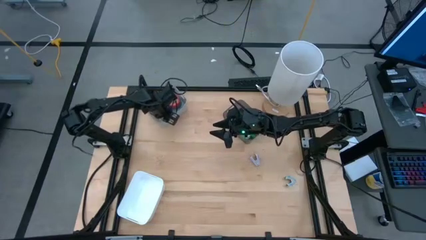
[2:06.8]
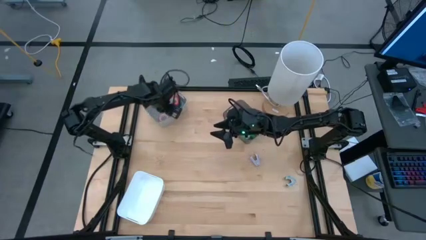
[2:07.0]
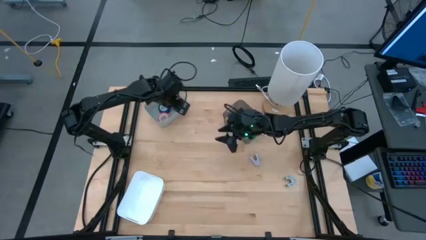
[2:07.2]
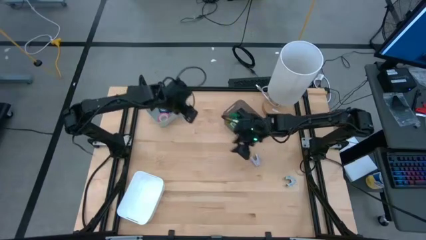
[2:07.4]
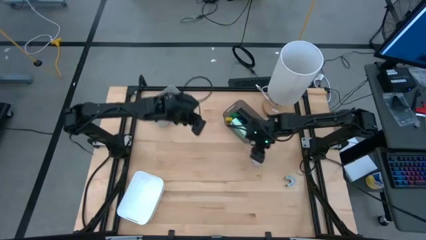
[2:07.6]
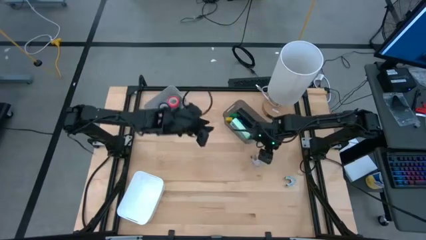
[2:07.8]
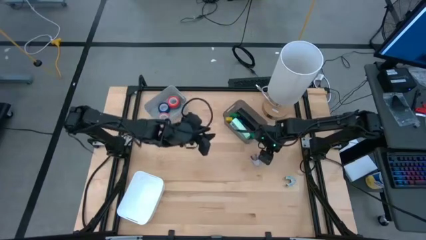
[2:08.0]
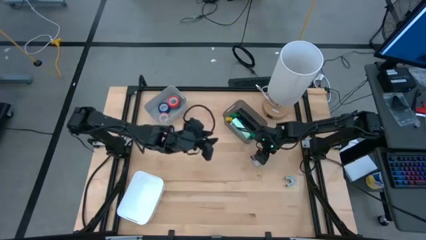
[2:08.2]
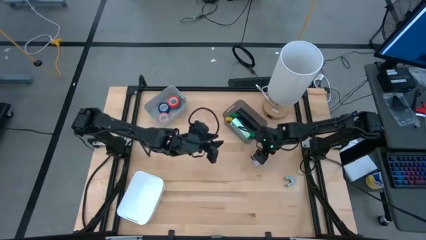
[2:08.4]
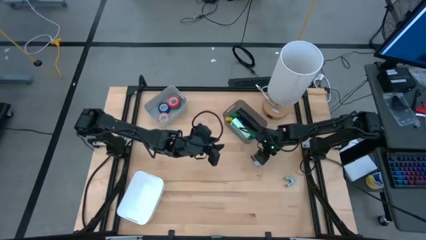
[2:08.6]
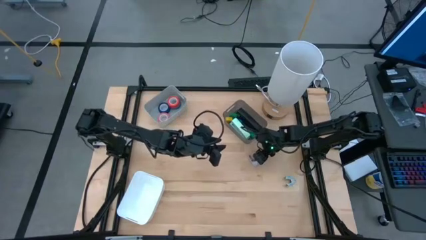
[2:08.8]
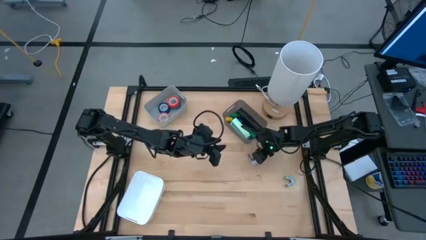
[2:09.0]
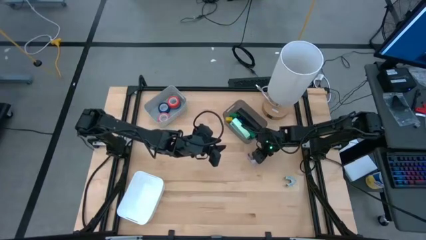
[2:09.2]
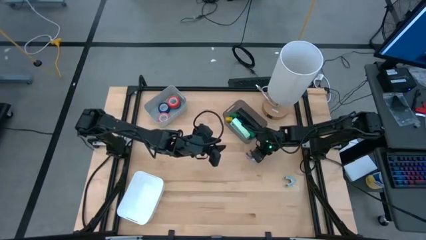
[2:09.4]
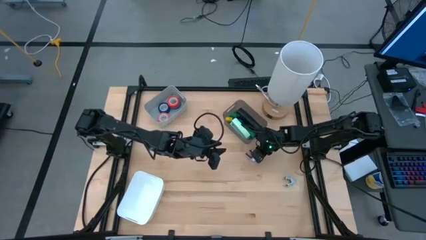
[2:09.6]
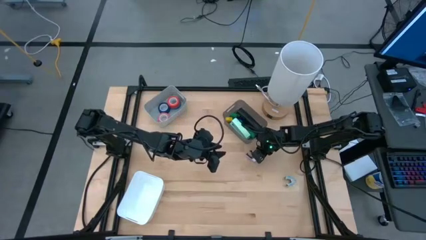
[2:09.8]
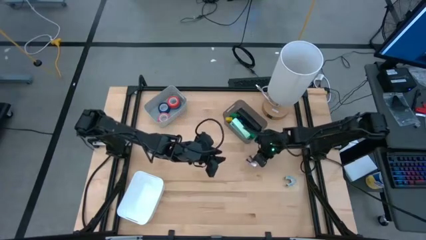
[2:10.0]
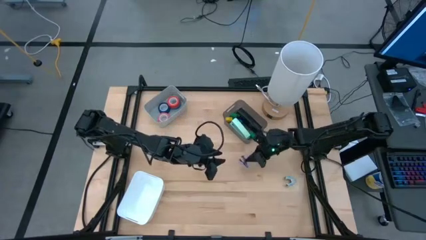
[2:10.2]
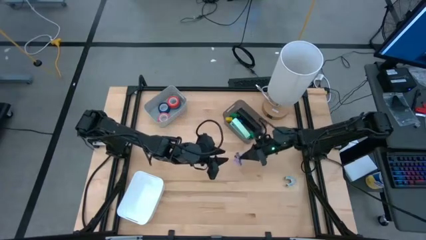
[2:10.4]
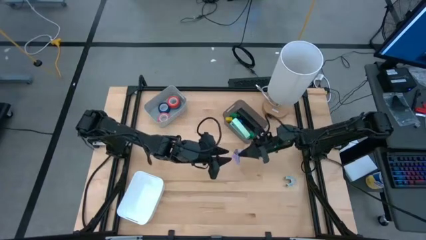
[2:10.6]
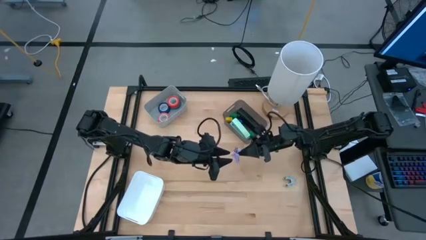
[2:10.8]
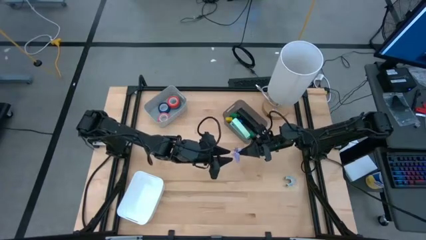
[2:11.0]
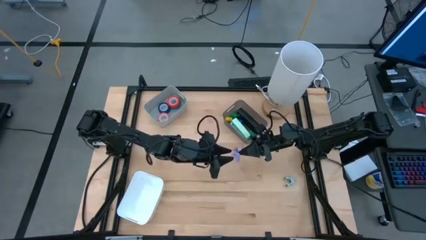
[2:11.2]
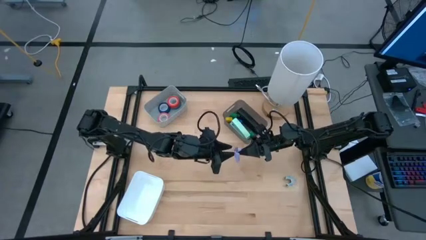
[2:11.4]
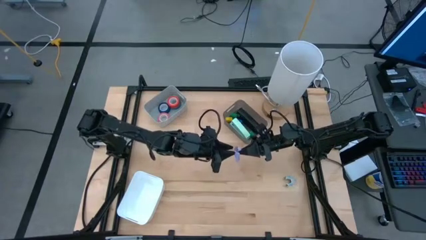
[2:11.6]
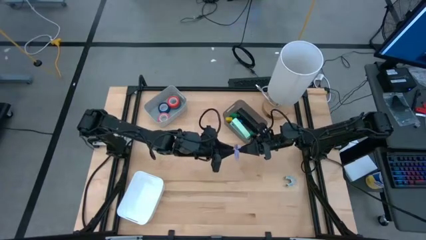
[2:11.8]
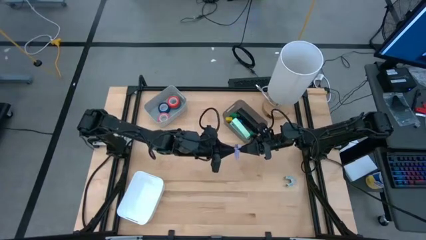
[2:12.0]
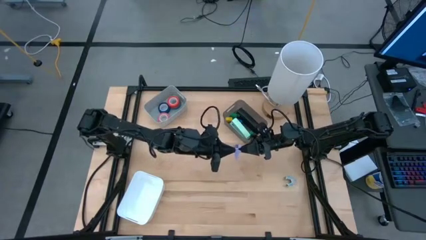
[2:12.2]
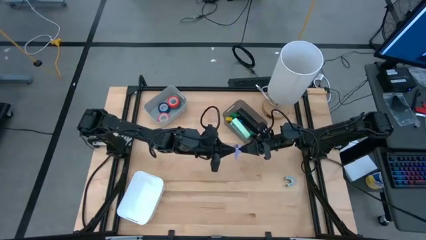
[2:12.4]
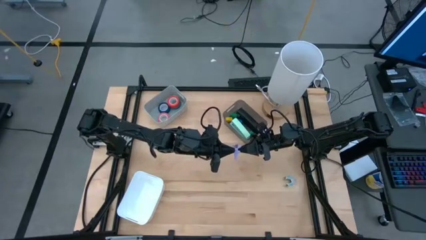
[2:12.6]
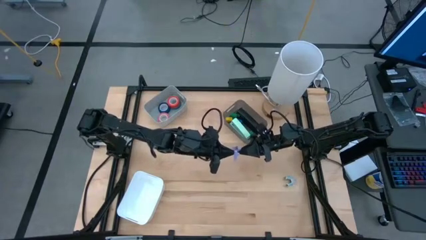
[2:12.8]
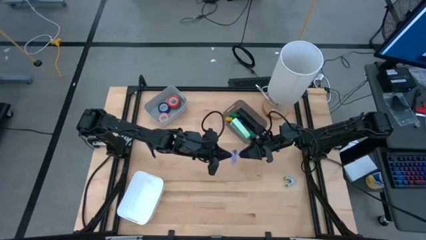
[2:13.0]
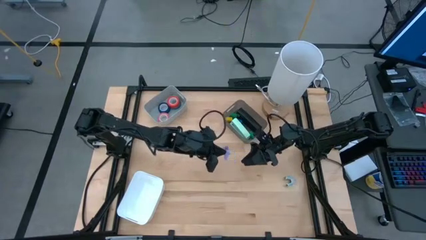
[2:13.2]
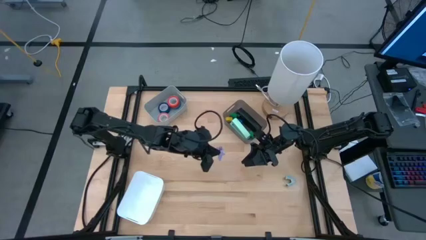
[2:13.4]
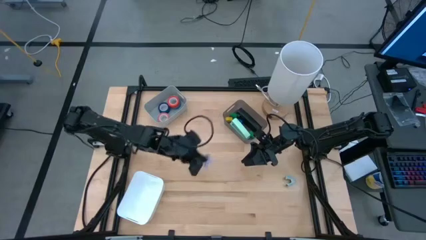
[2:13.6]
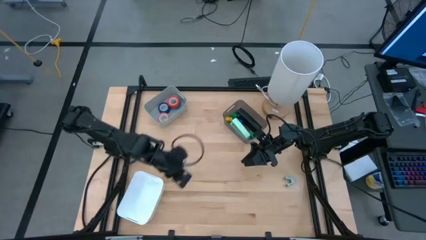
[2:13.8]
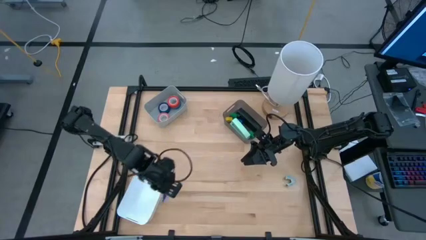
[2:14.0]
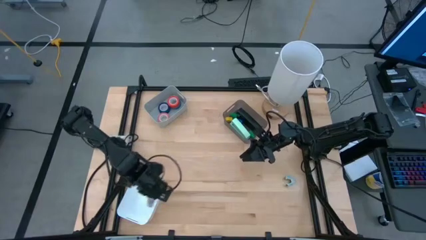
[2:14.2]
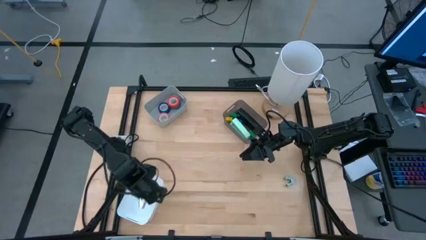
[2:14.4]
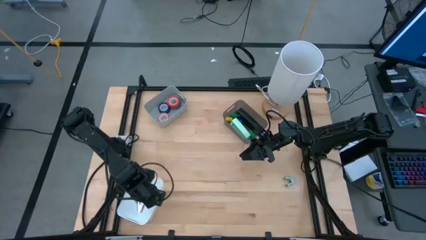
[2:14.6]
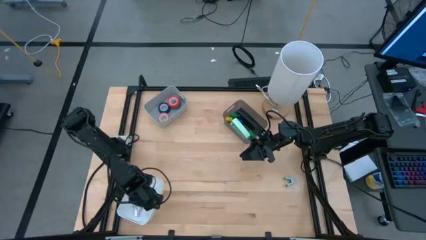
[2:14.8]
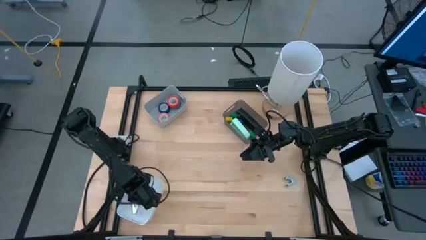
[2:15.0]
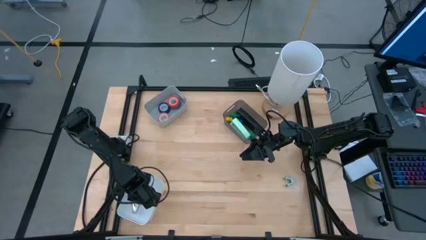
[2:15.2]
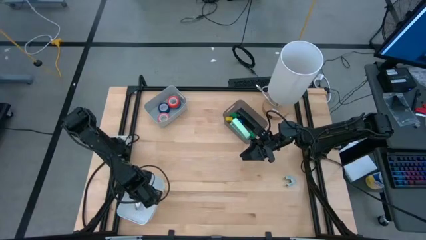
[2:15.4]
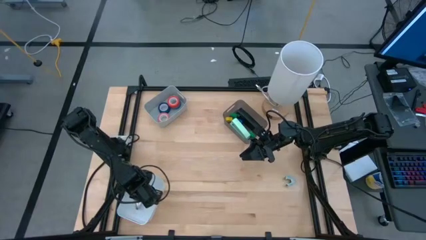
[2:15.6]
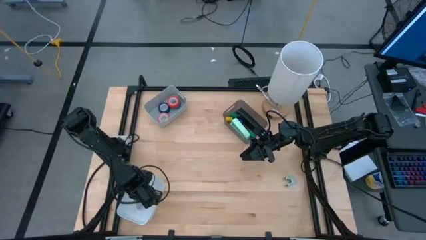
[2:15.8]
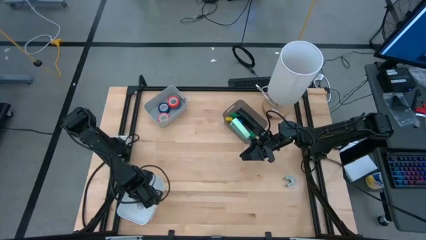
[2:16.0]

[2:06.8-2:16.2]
Task: Pick and place Stapler, Stapler remover, tape
Put the purple staple remover into the white bin

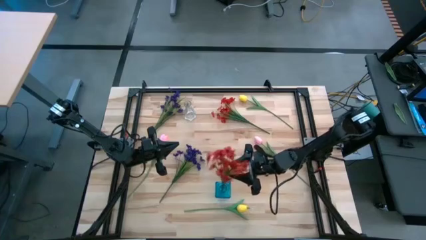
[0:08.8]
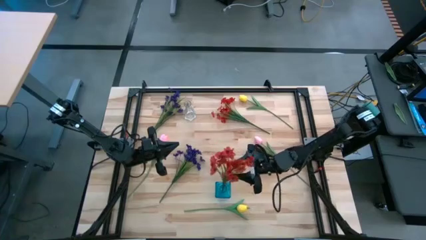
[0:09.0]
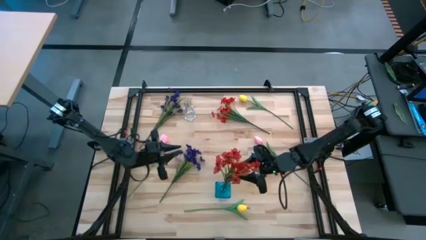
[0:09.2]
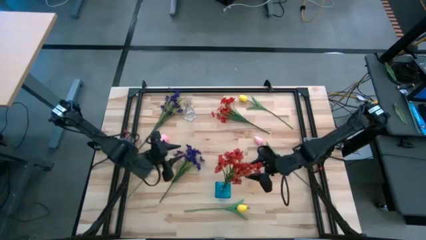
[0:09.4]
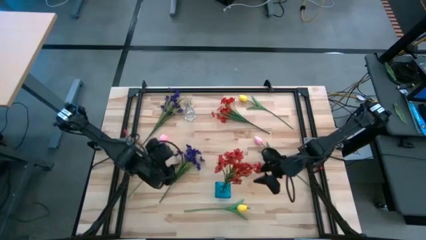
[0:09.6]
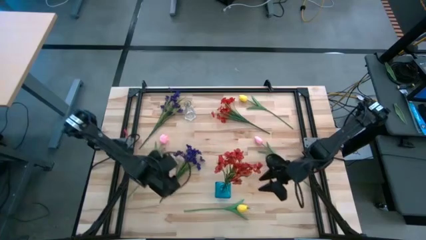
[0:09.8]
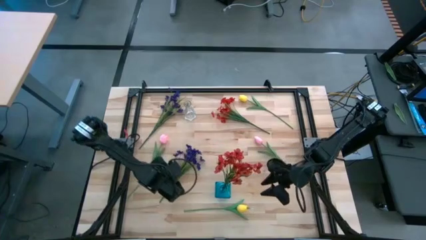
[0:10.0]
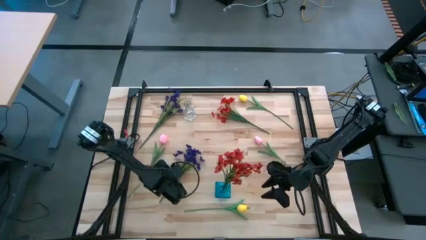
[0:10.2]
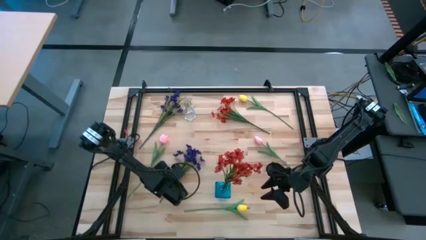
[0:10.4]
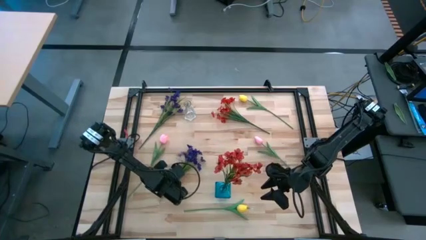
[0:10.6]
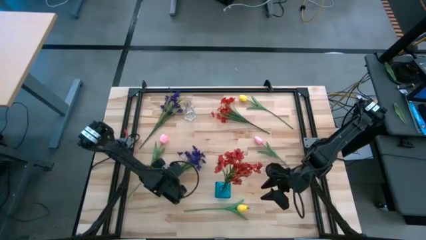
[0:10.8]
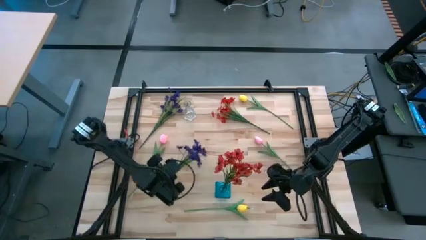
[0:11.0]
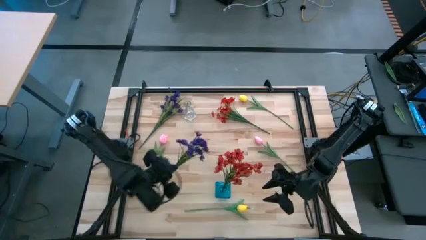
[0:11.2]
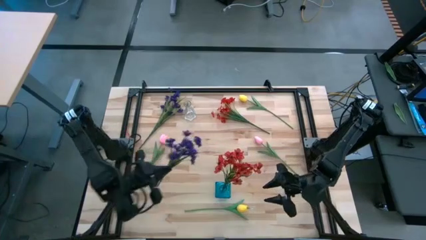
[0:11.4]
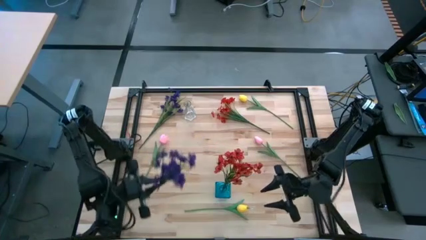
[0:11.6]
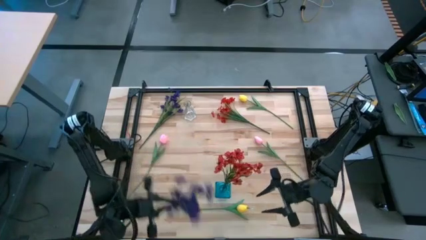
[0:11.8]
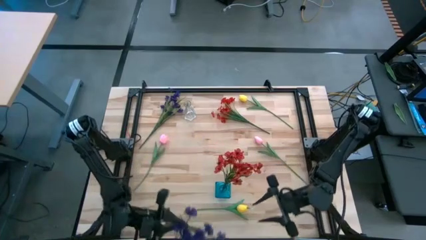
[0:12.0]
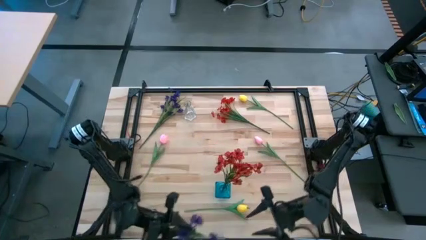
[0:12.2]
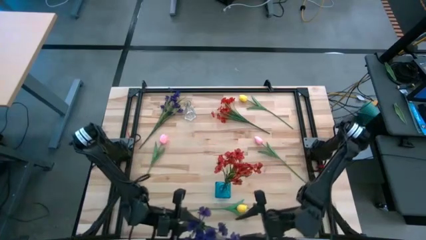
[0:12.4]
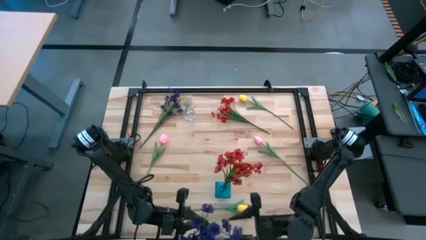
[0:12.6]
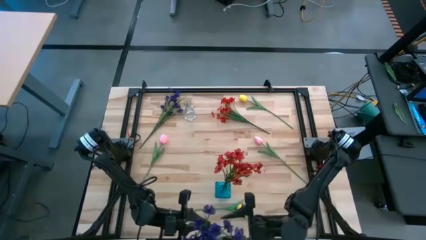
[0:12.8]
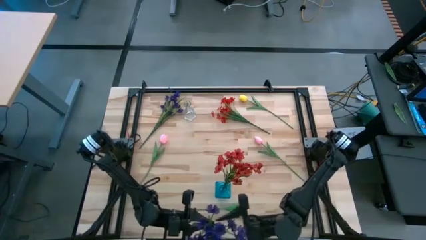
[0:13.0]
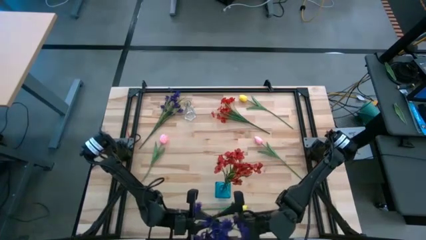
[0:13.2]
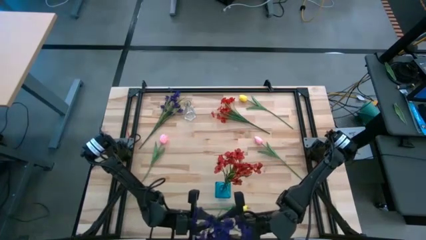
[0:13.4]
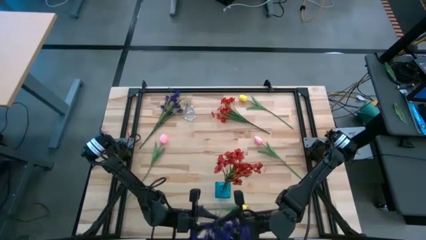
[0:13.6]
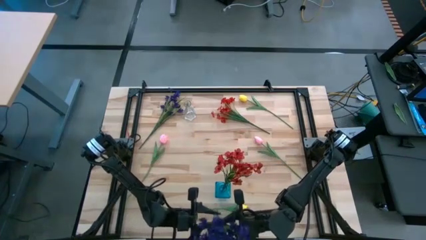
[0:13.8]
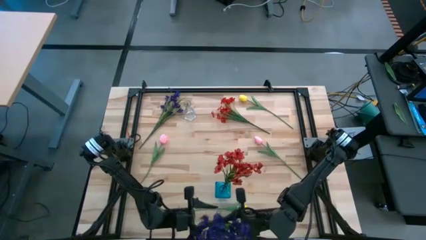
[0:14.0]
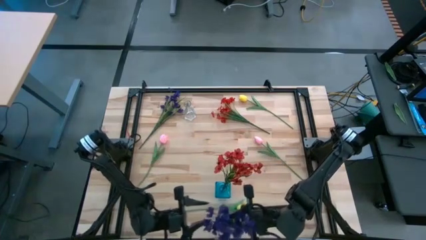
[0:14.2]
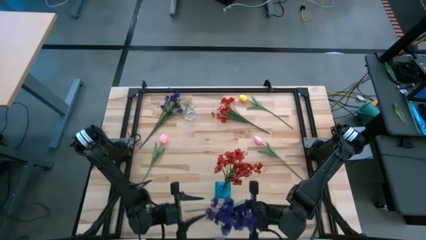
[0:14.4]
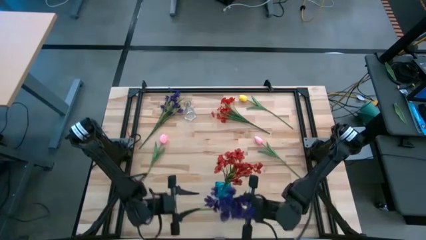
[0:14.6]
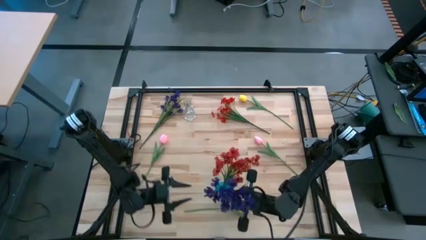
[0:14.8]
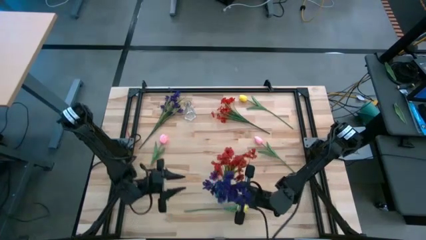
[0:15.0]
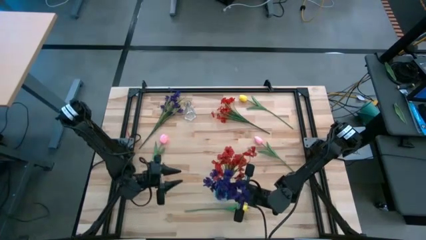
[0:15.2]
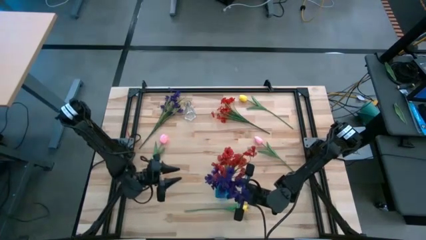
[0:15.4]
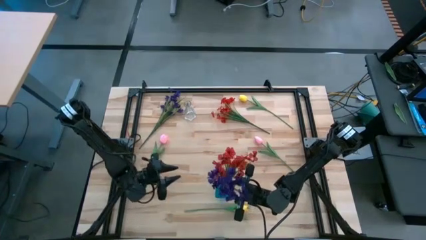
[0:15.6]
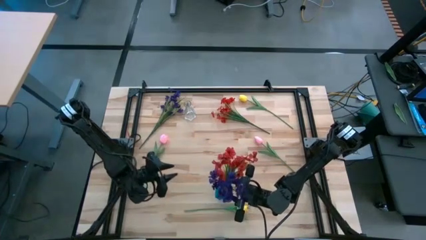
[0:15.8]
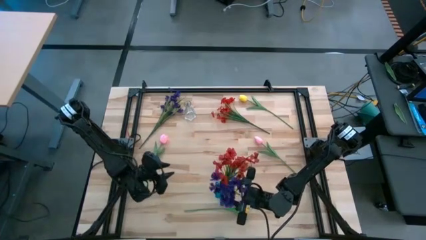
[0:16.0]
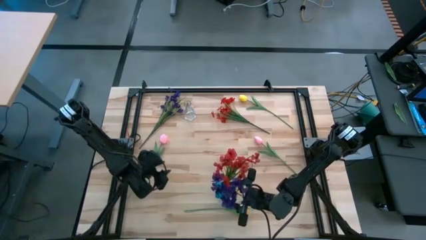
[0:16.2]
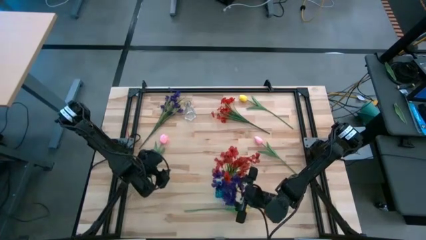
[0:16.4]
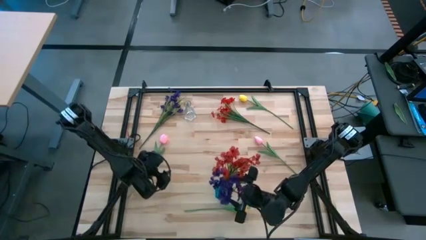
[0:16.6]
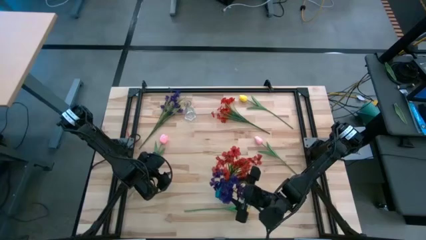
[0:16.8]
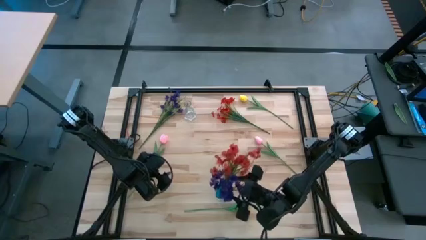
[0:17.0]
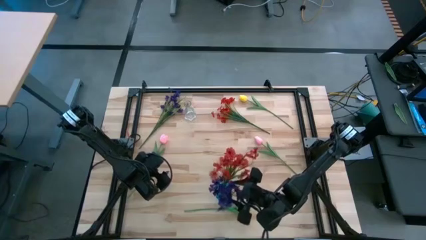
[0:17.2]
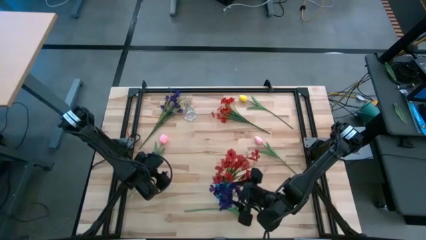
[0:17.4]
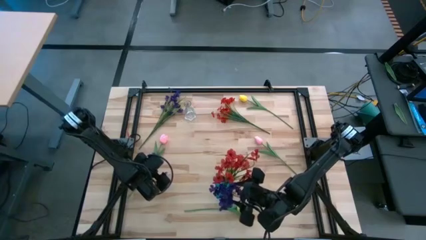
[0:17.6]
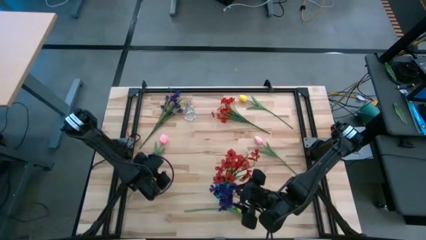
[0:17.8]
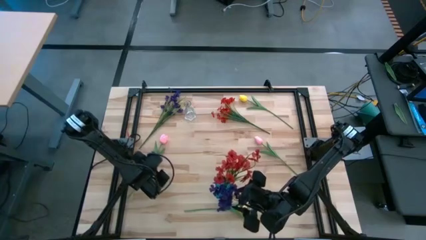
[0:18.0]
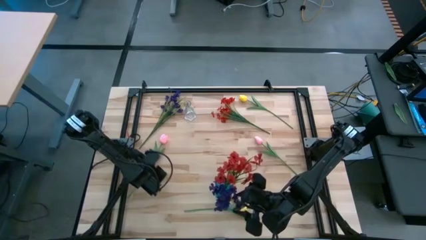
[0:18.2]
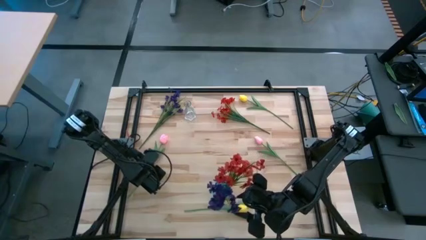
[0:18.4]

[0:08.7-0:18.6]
Task: Sort flowers into vase by color
Put the bottom violet flowers into the blue vase
